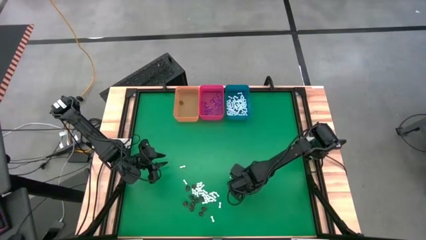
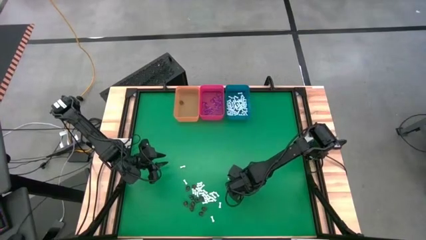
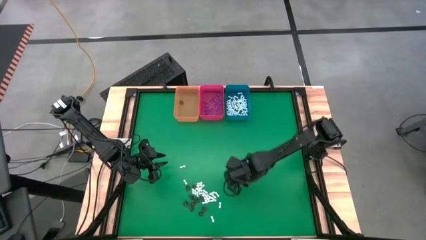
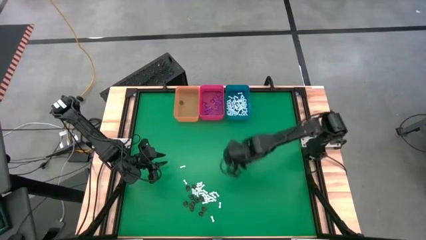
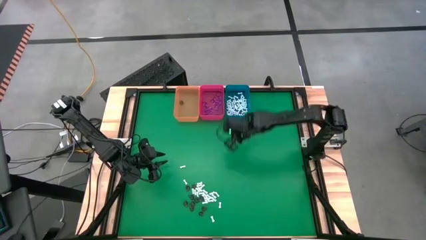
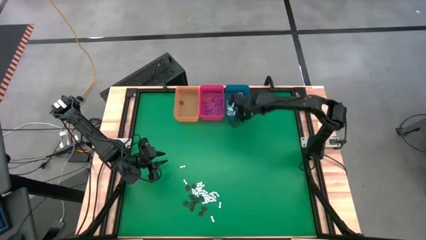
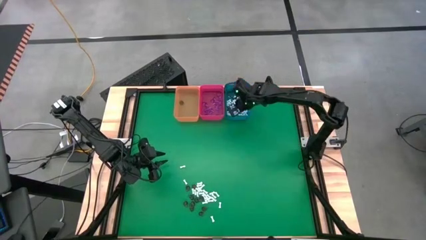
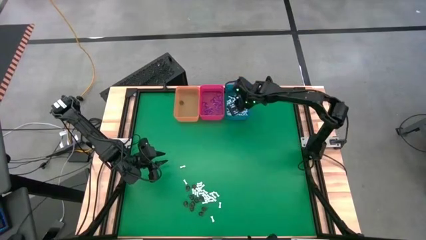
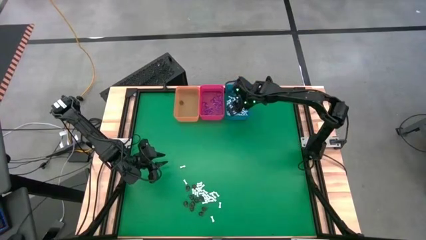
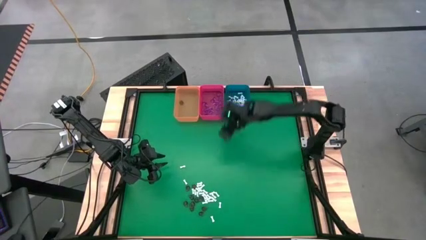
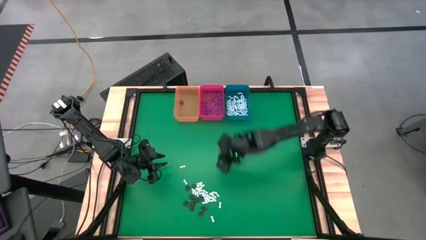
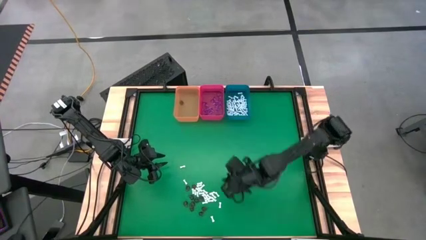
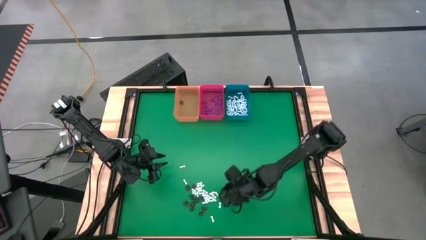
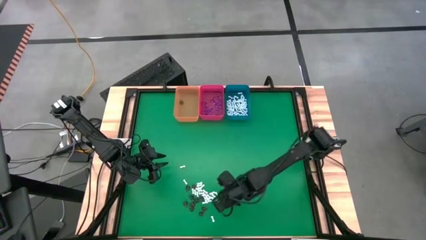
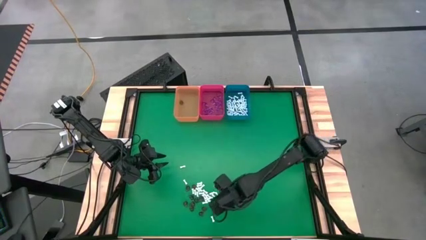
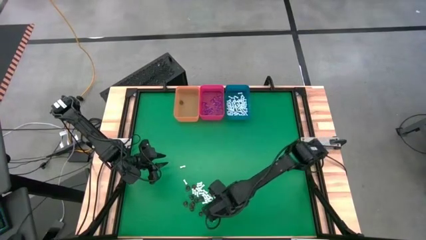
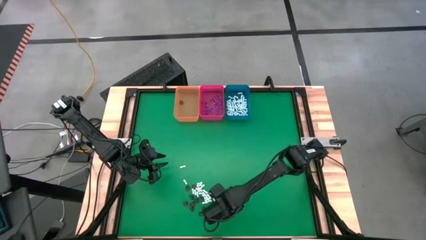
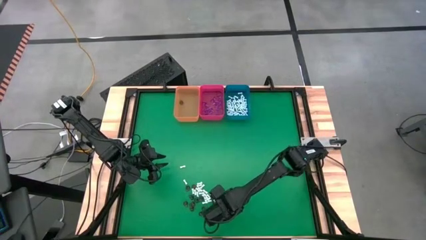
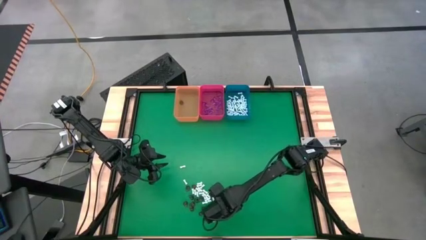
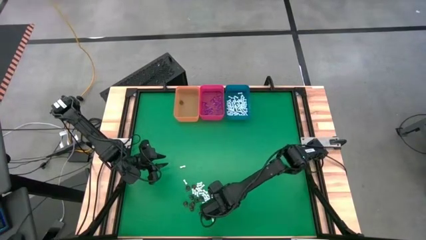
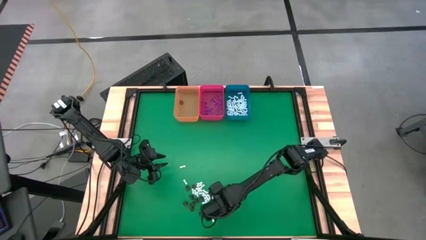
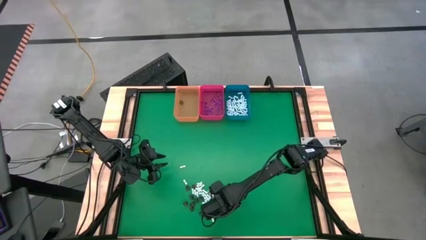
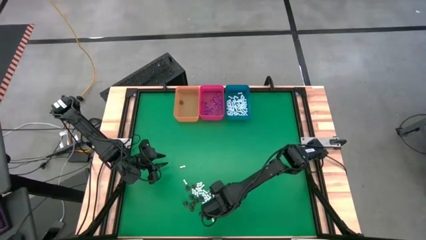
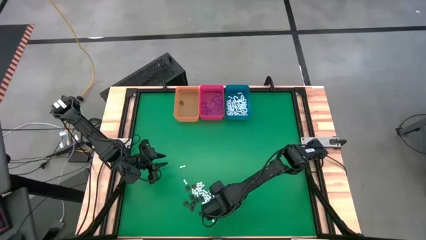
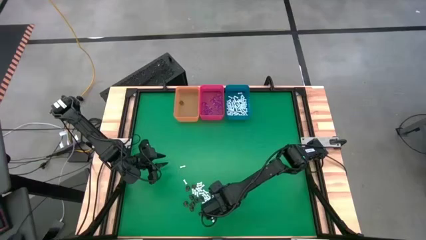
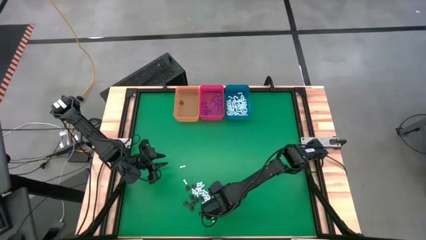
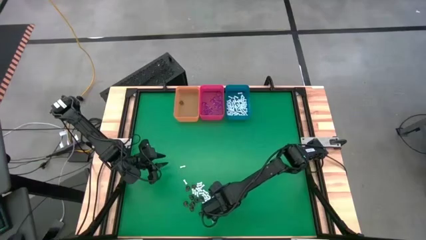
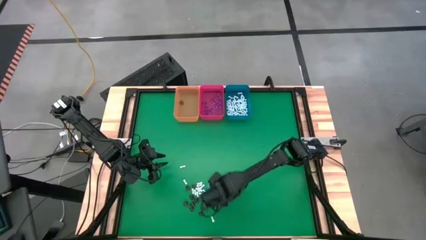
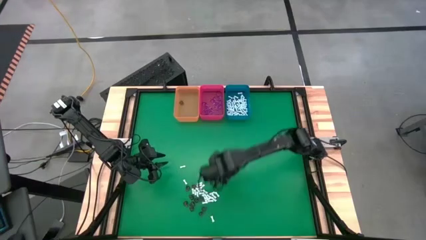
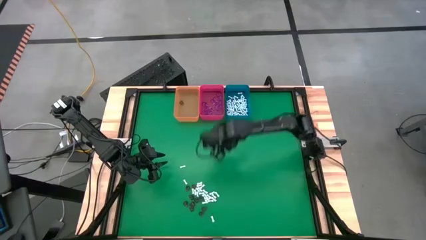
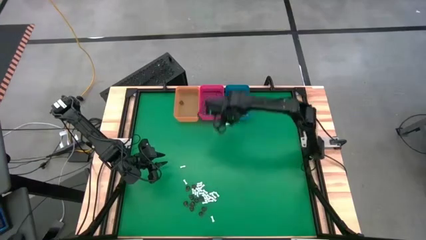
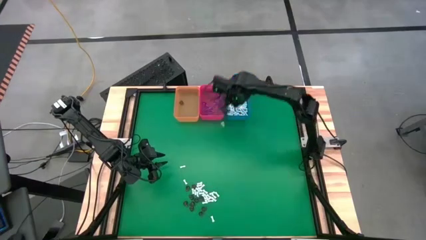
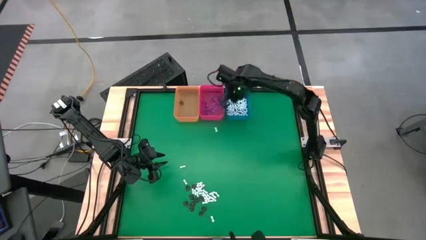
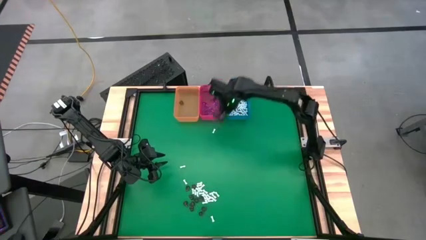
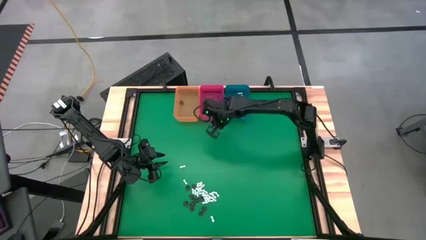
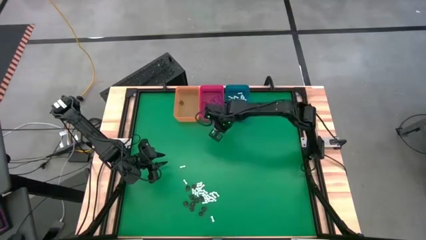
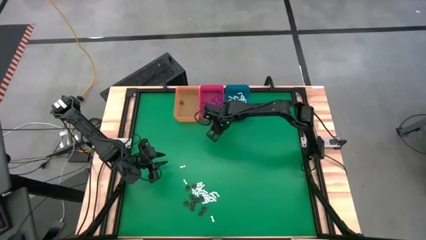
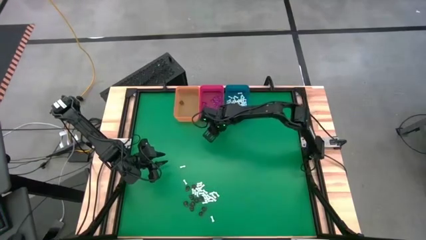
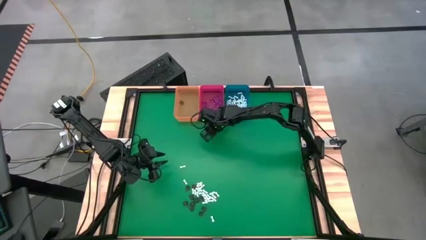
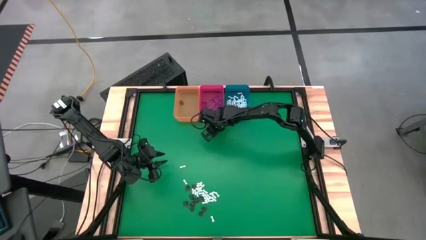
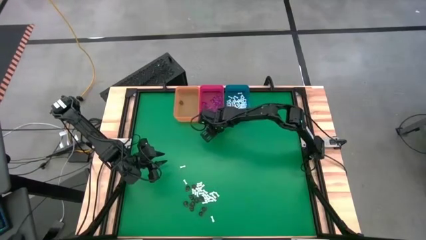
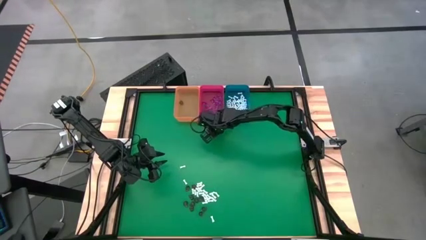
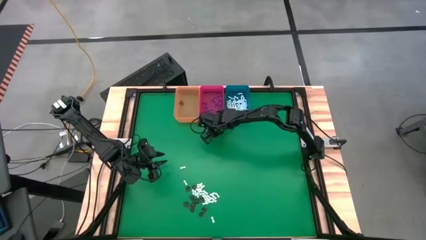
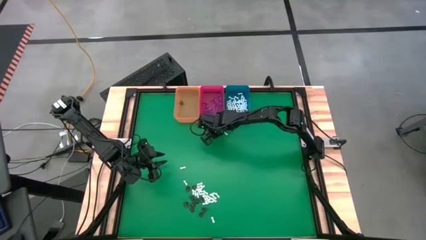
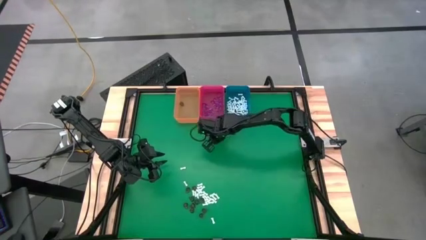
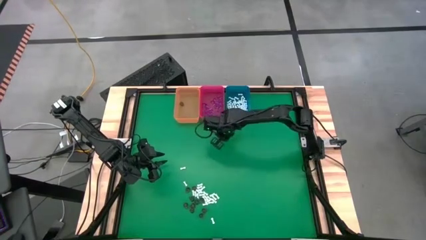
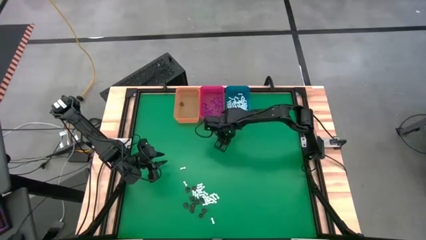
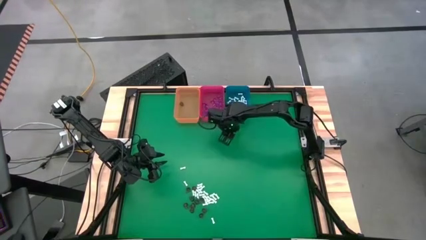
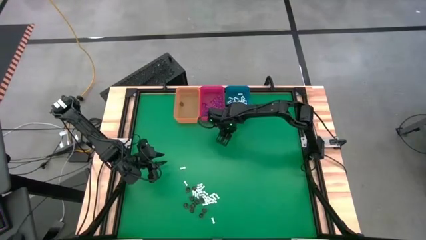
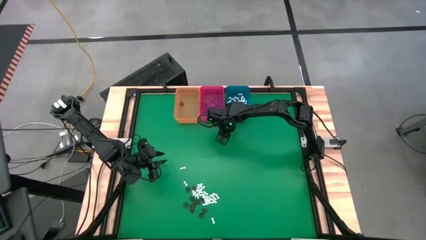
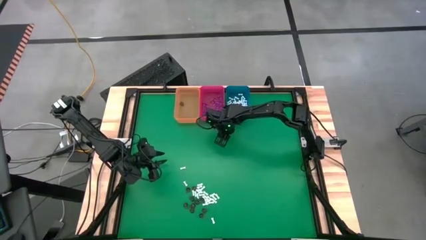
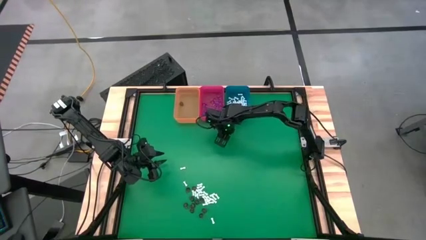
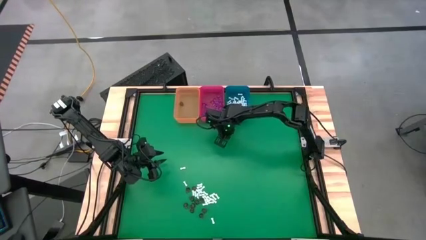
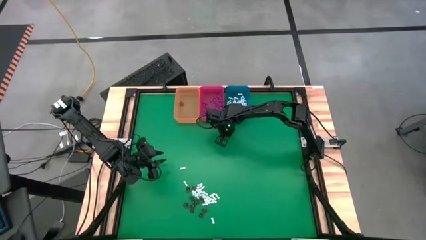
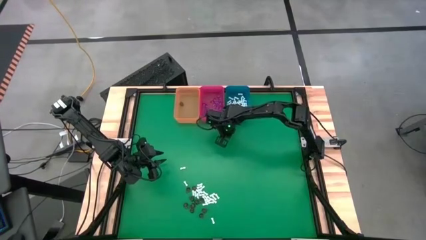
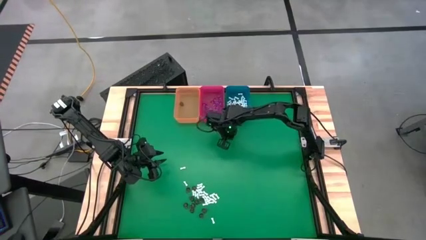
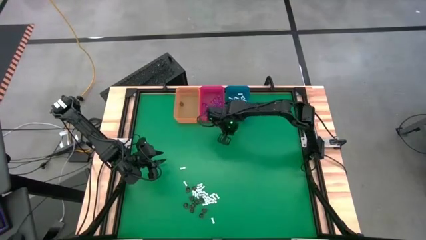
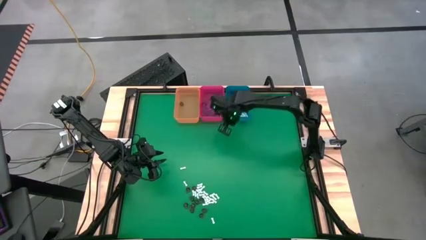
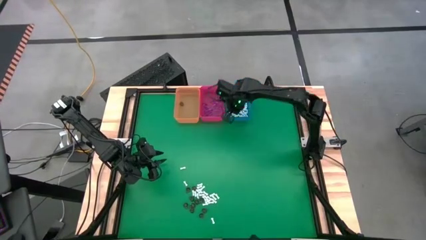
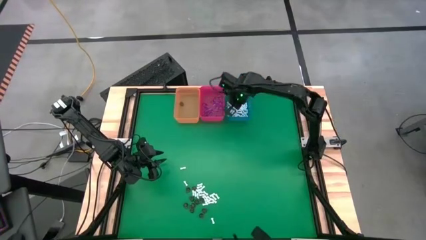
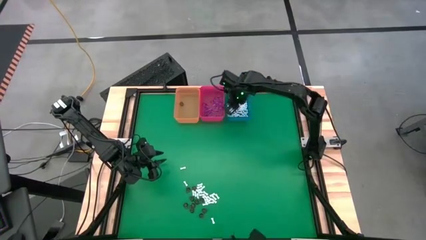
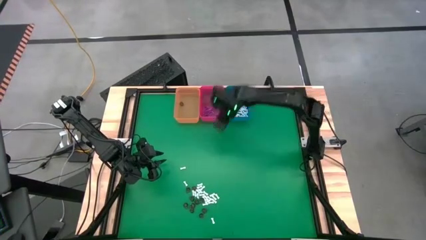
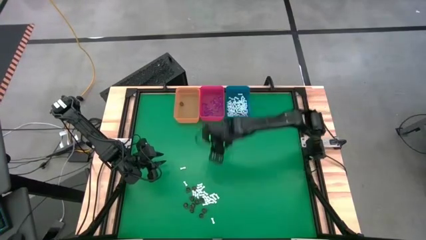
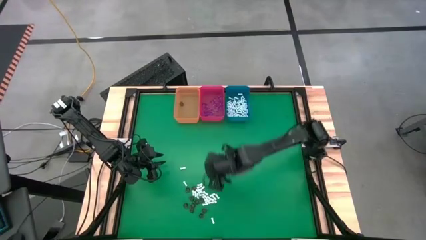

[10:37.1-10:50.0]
Task: Sort Halloween decoration
Put the violet witch hat toy into the red bin

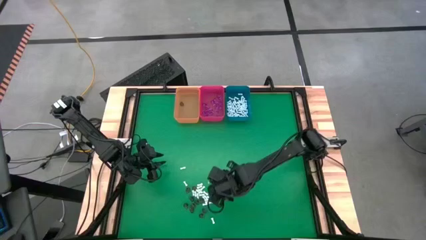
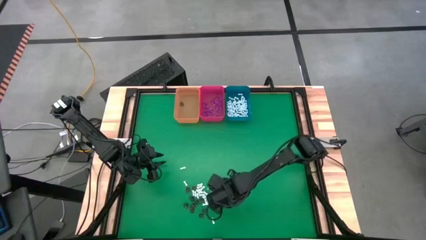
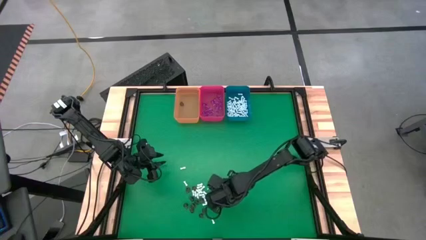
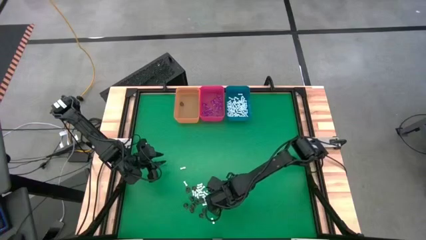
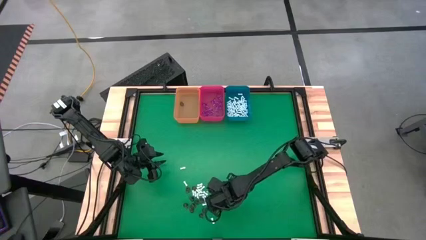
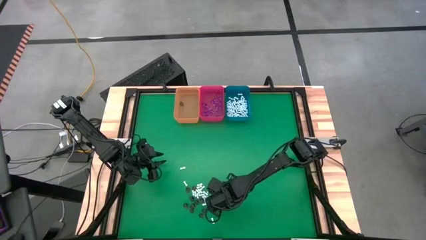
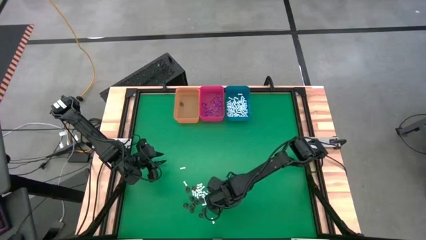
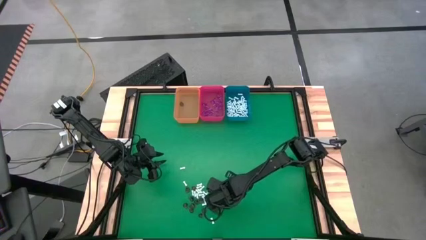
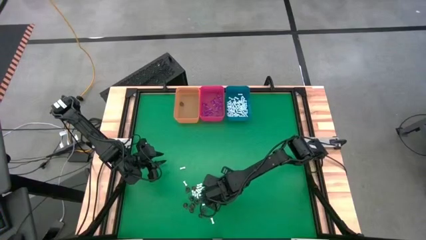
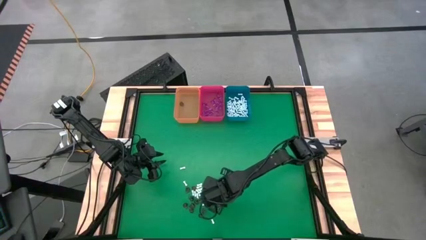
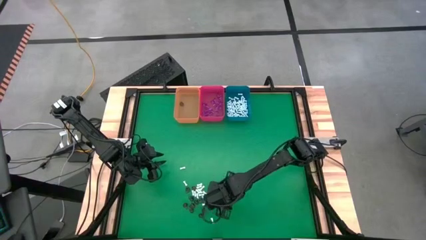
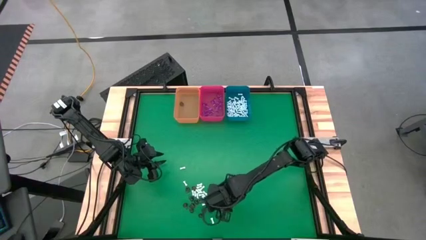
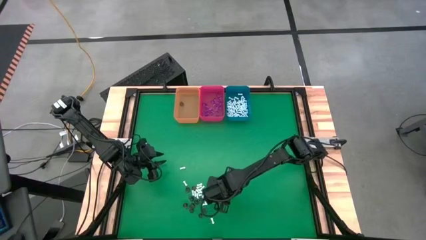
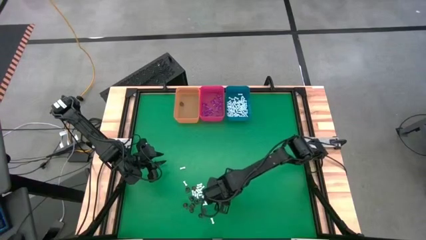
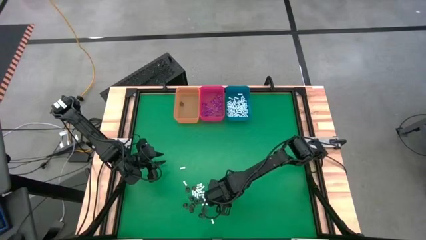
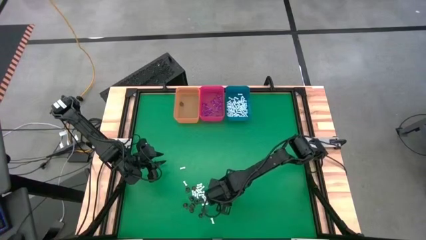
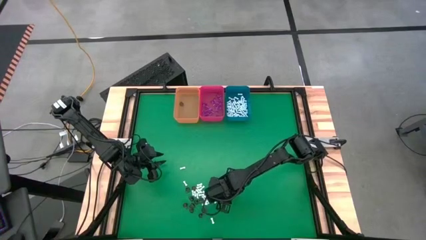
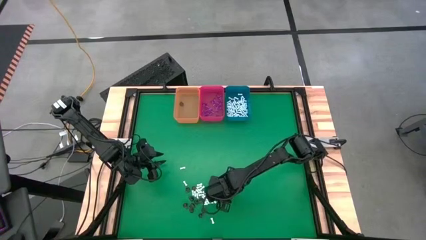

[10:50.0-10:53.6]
Put the white bone toy into the blue bin

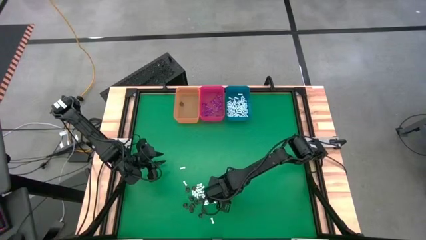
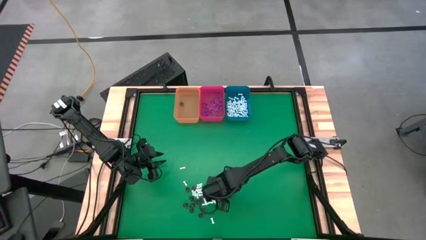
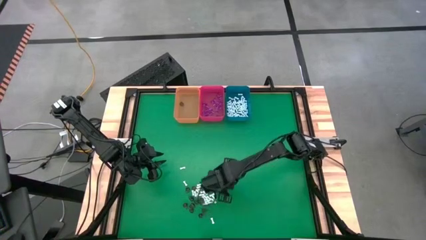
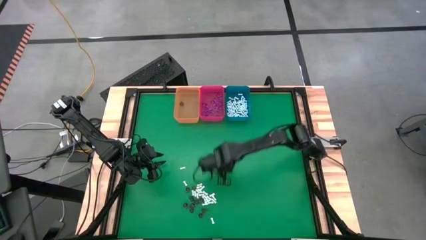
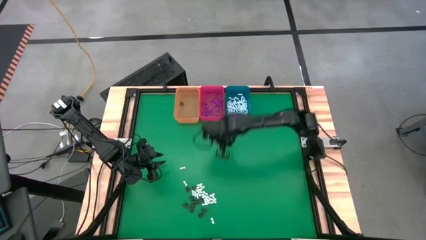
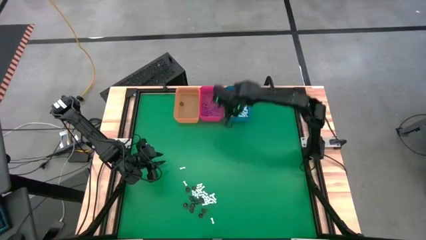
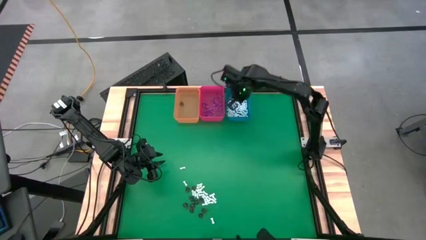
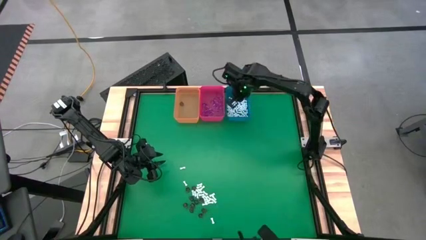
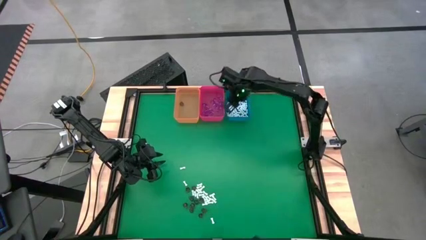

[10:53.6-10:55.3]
Put the white bone toy into the blue bin
